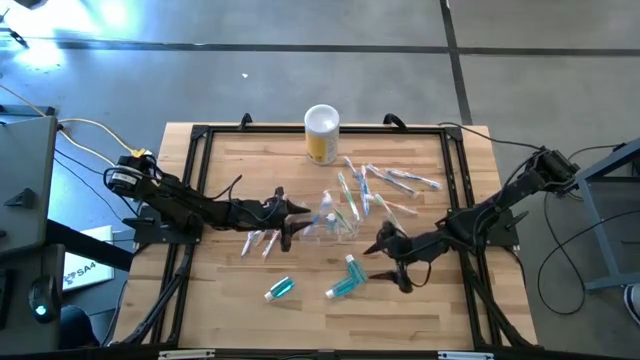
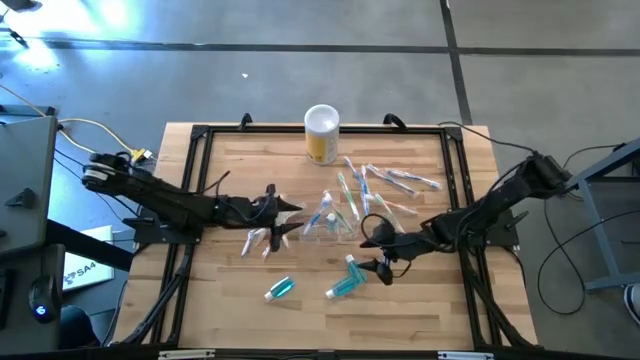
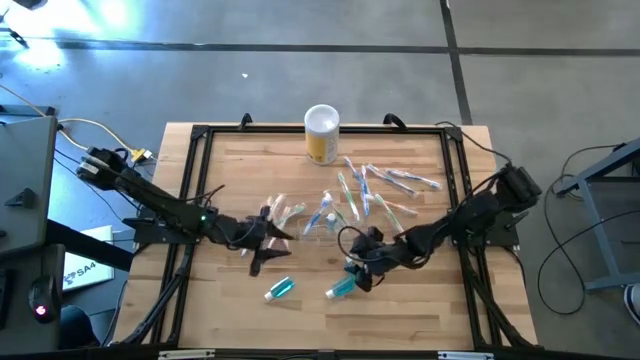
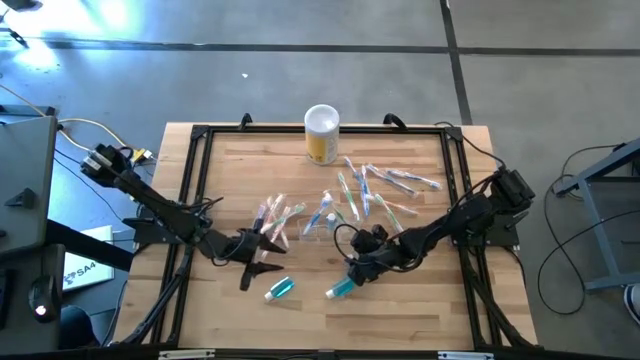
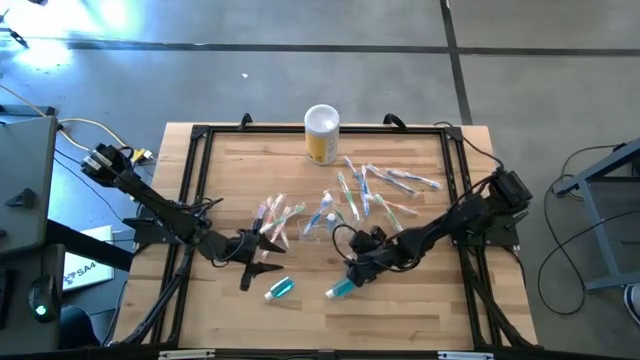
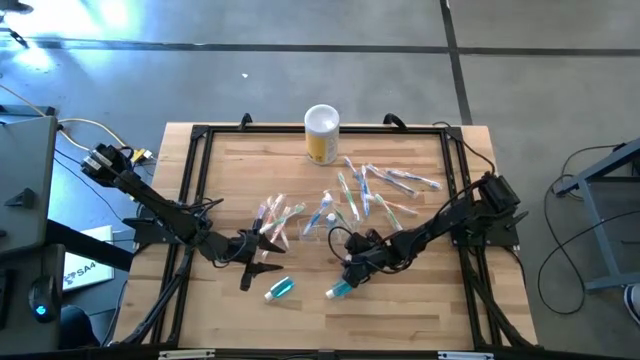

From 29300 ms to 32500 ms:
Task: Pick & Place toothbrushing station
Put the blue mouthwash in the transparent organizer

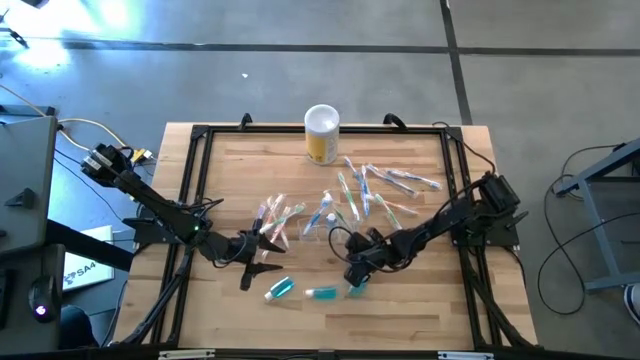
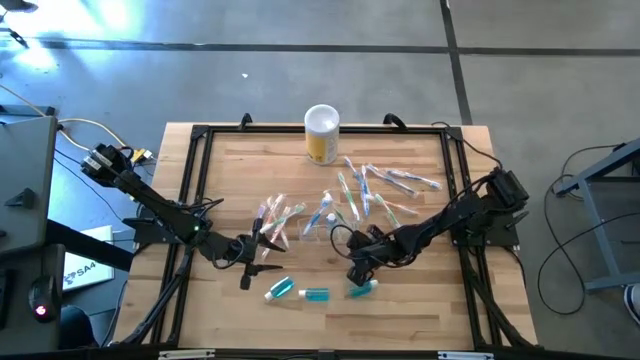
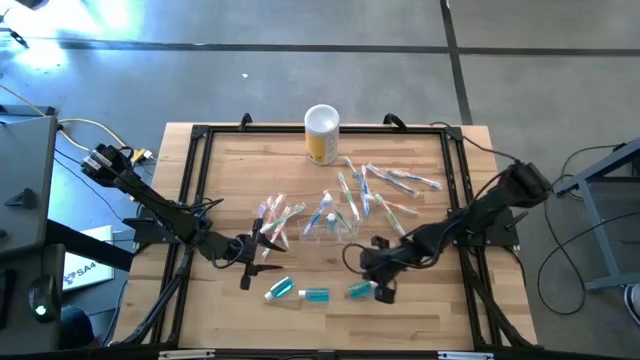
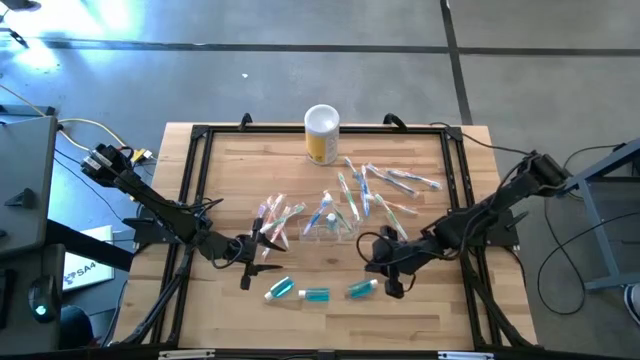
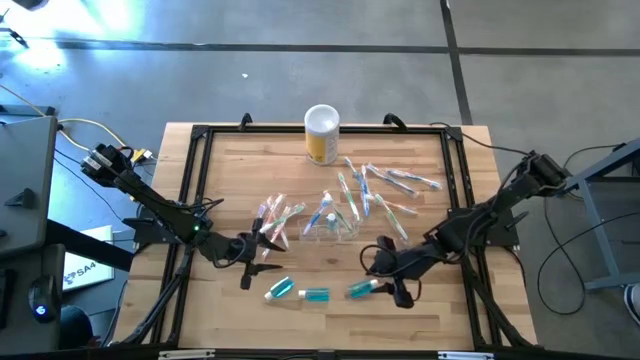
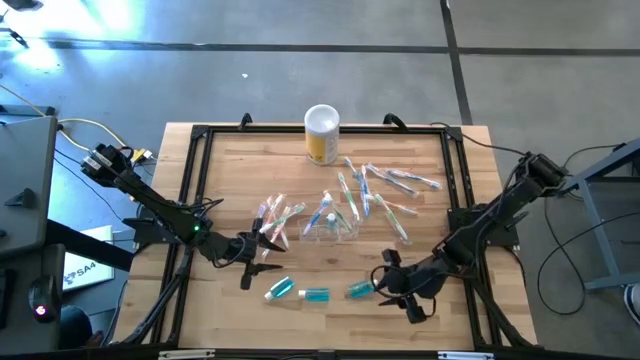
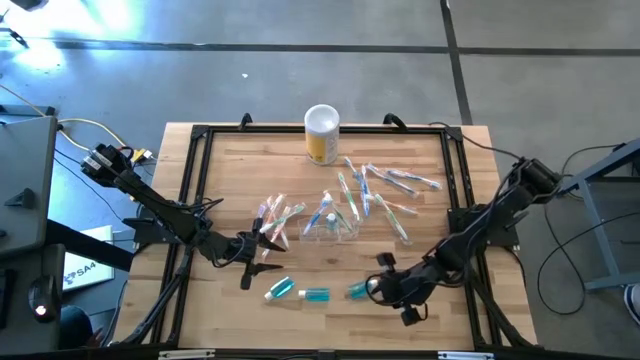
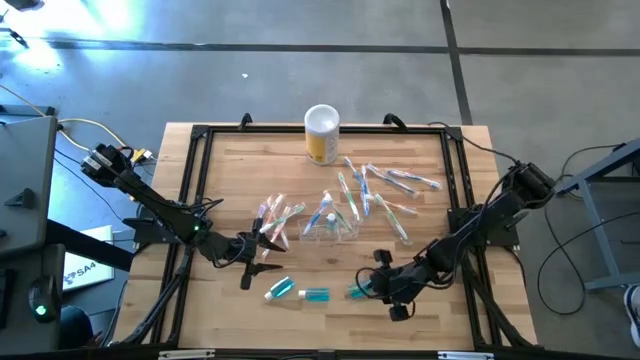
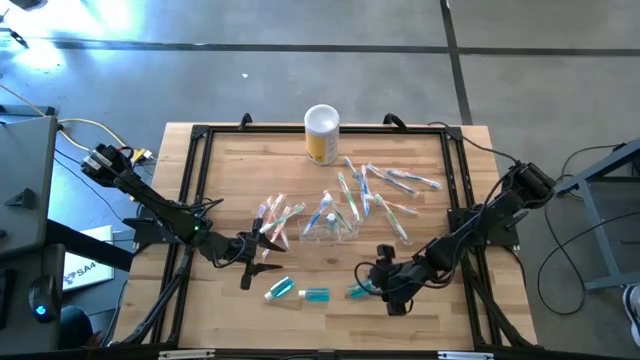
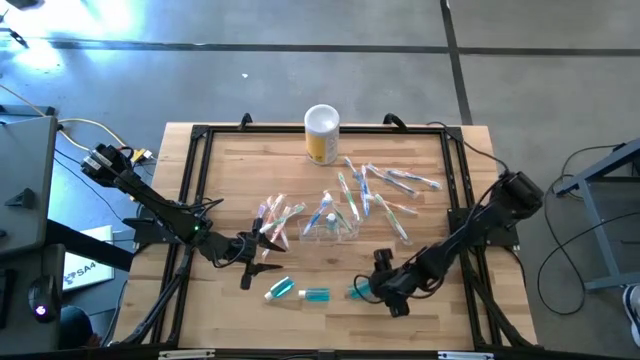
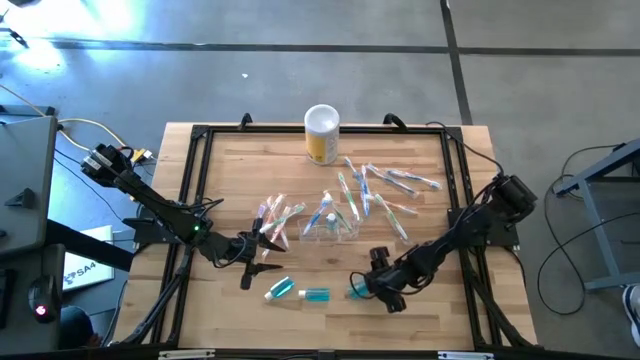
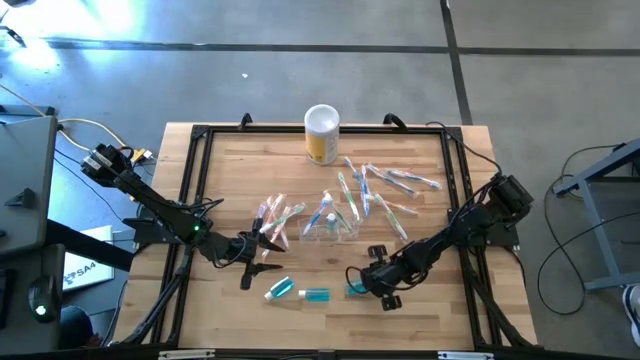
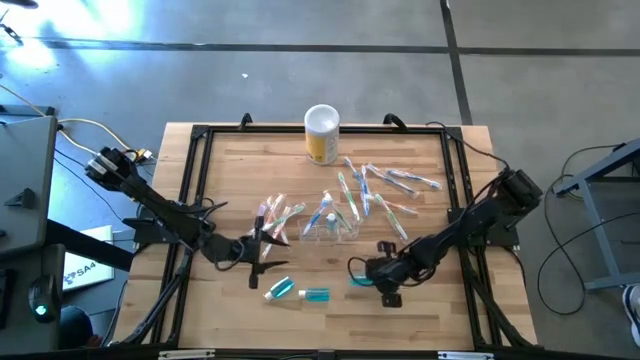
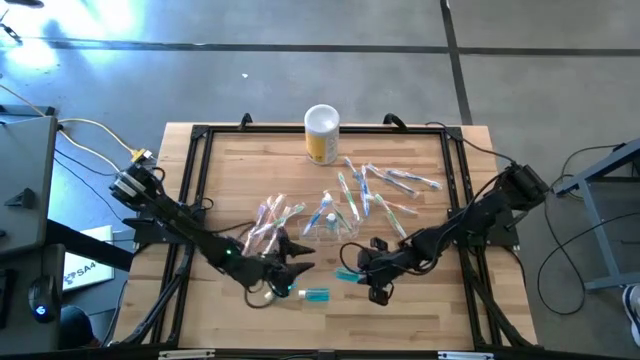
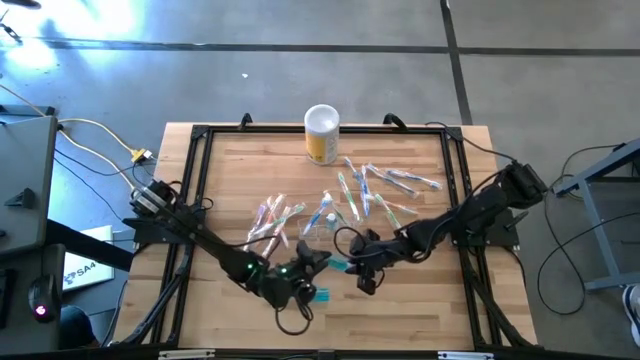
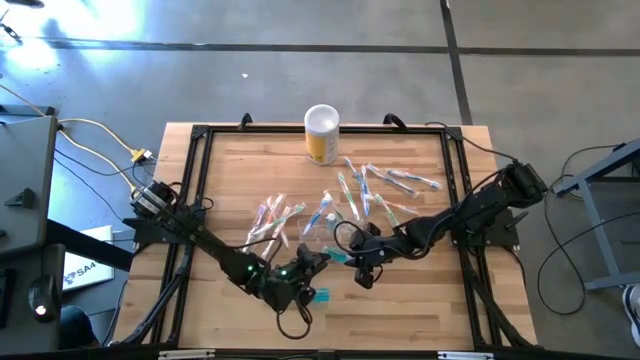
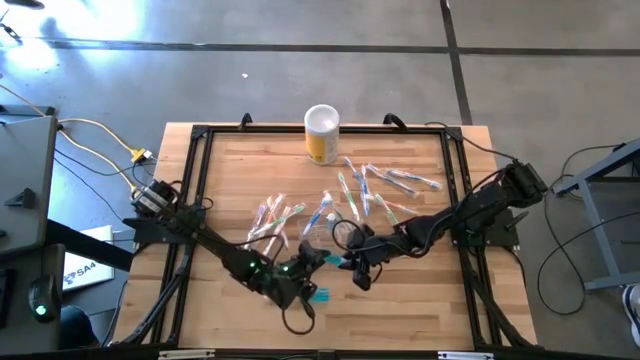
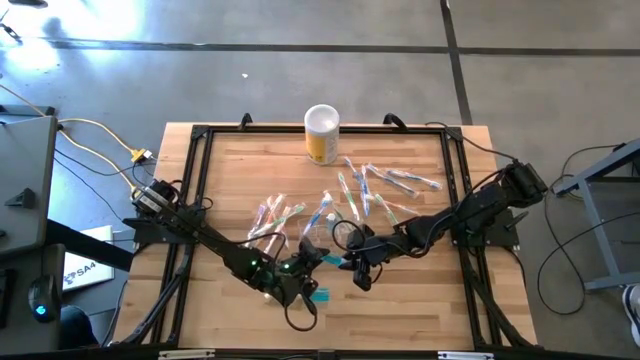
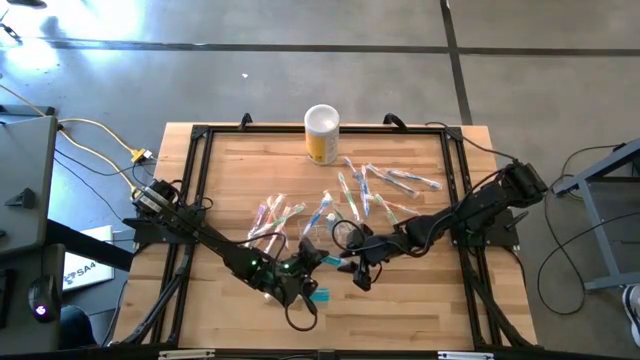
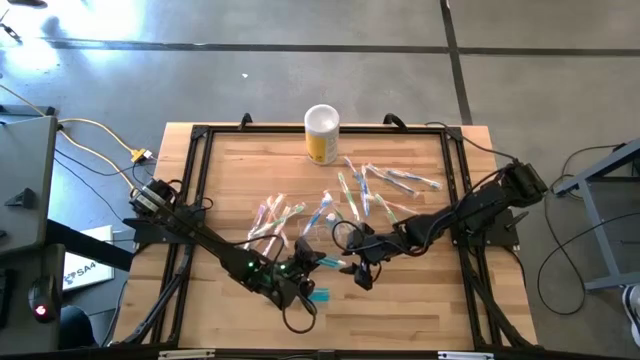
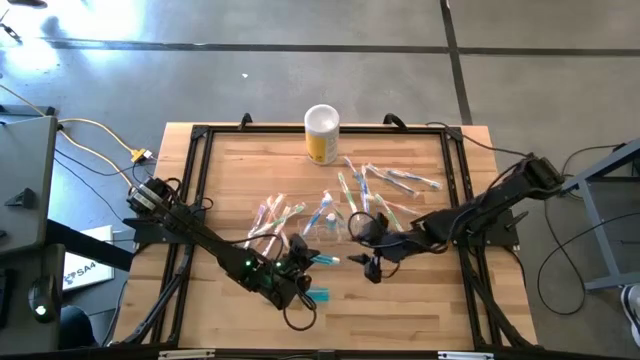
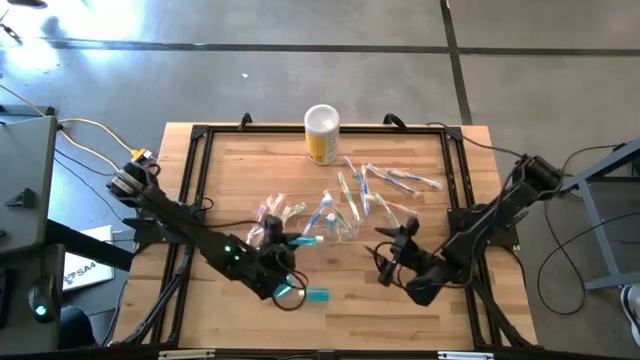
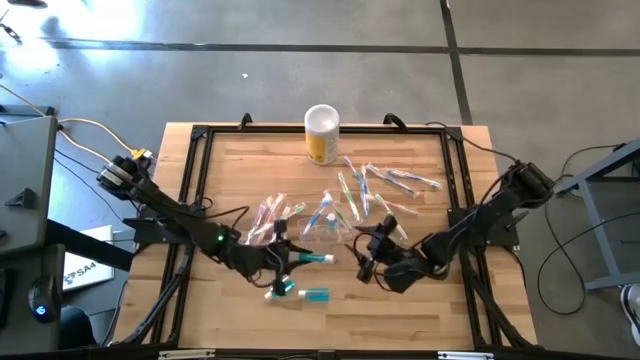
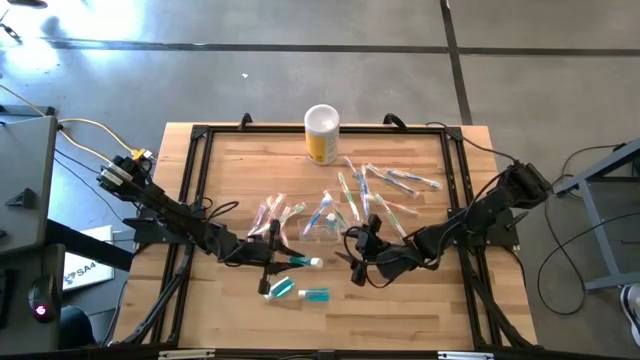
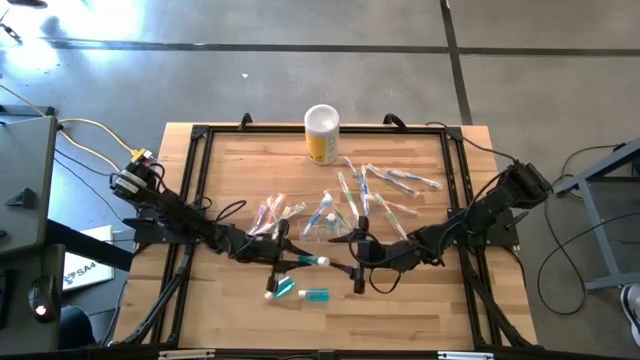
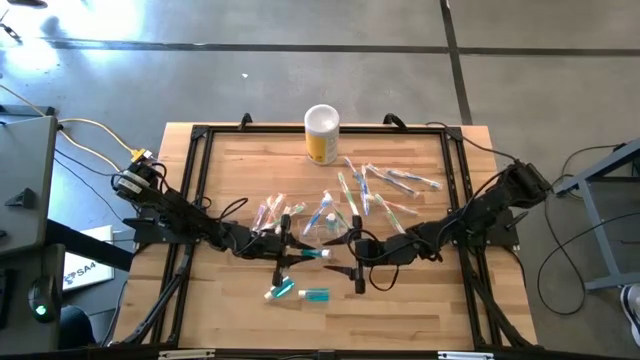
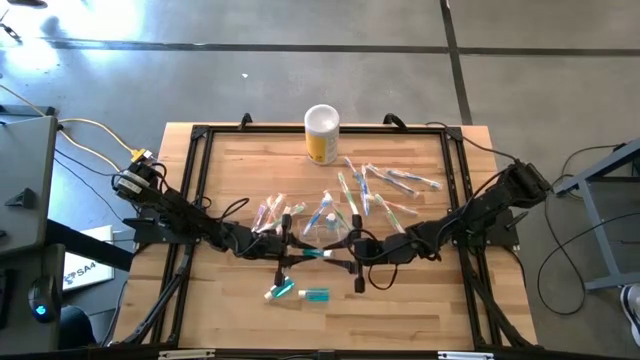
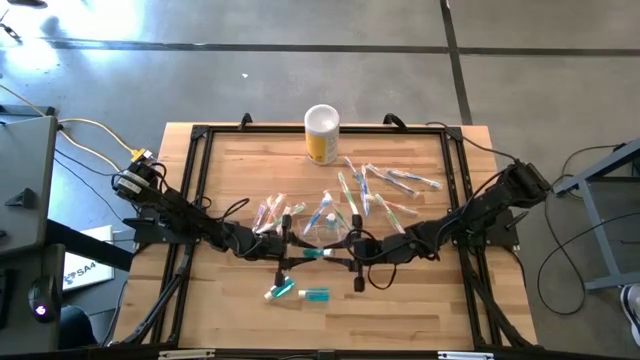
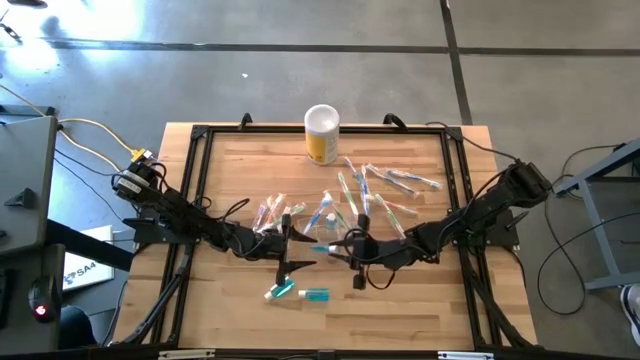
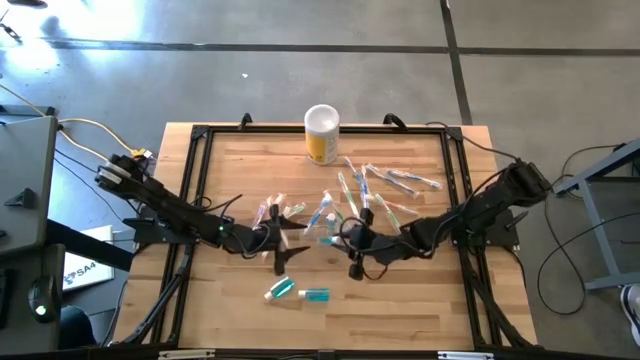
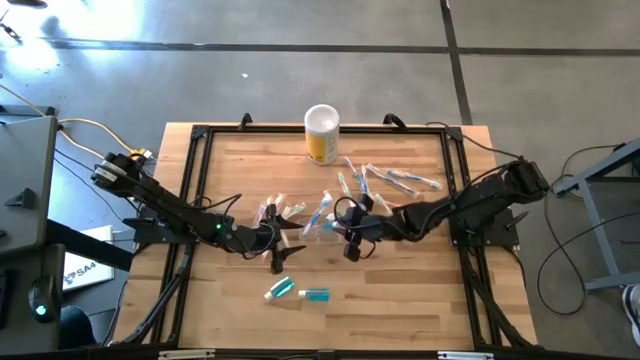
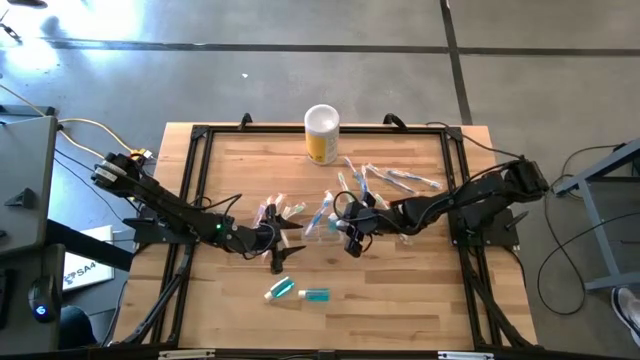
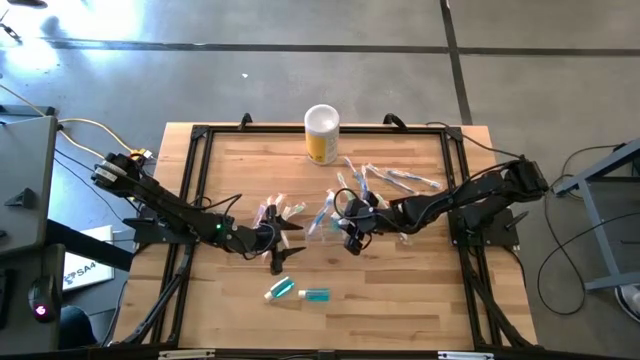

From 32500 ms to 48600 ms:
Put the blue mouthwash in the transparent organizer

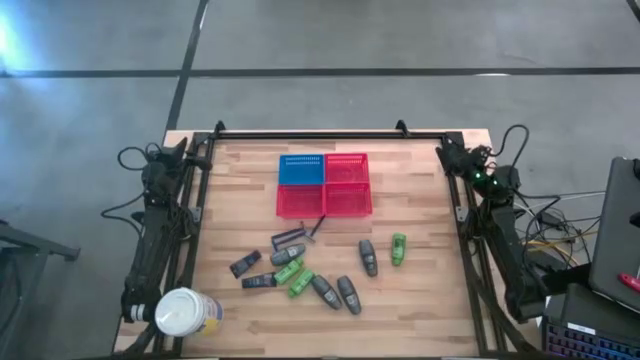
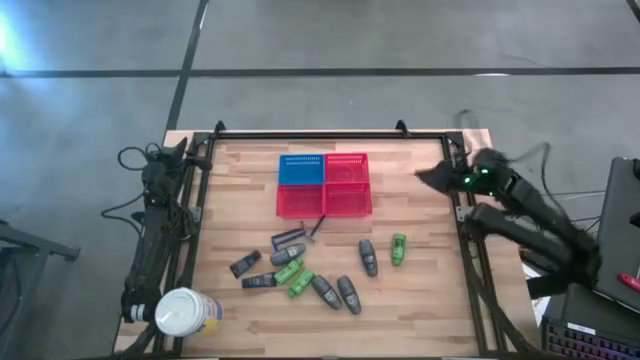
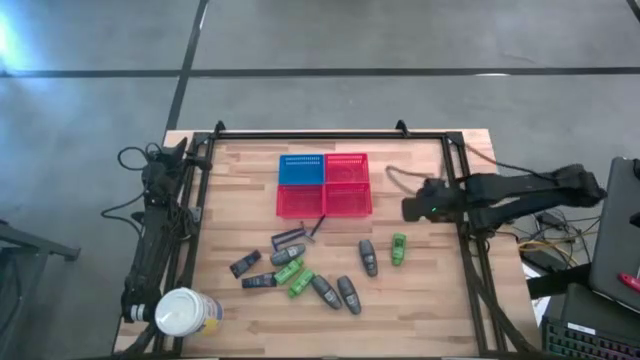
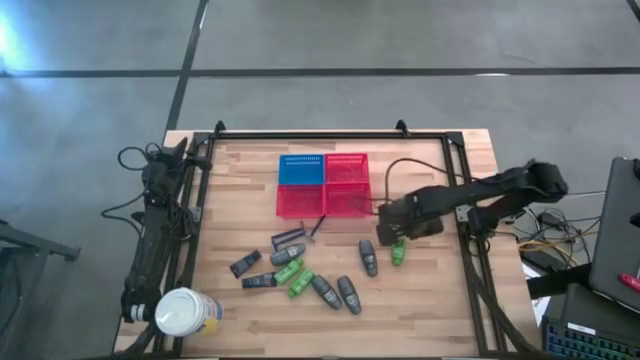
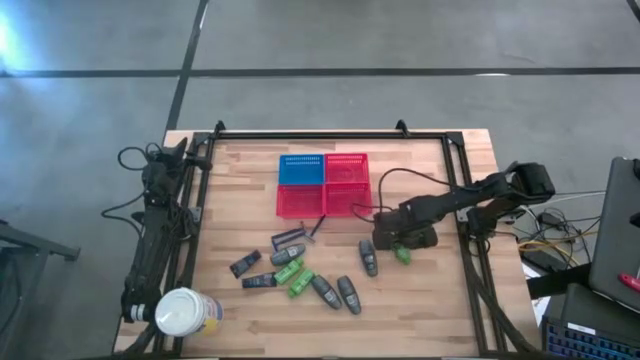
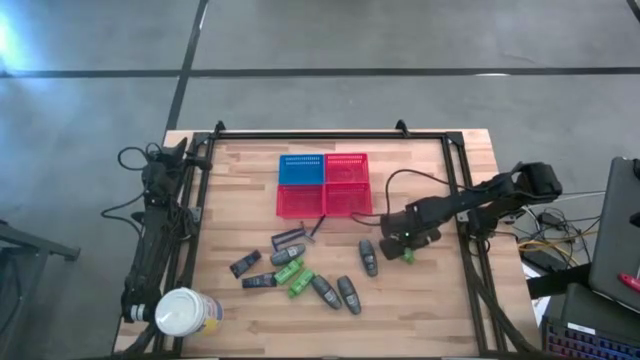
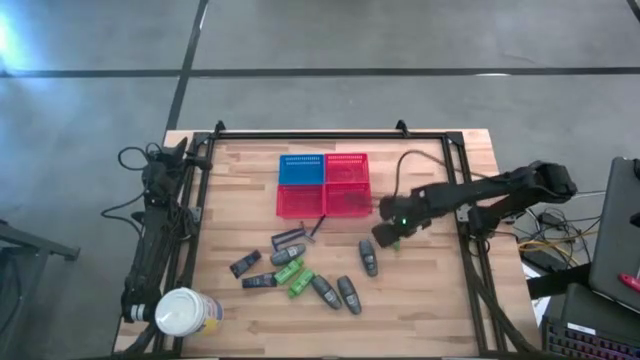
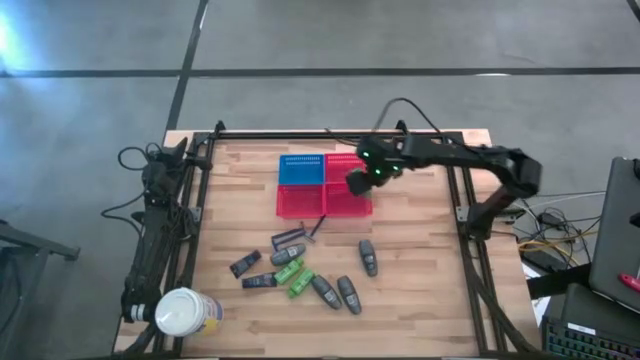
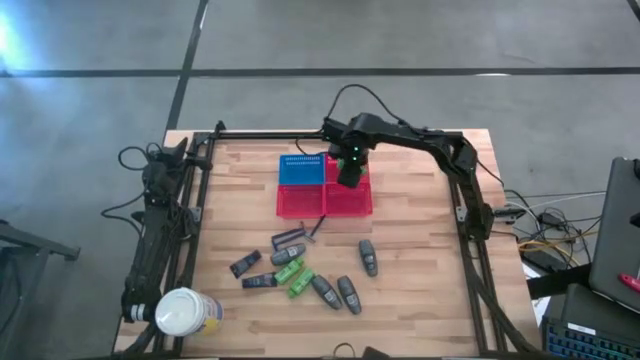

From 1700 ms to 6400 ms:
Task: Pick & Place Travel size toiletries
Put the shampoo into the top red bin
